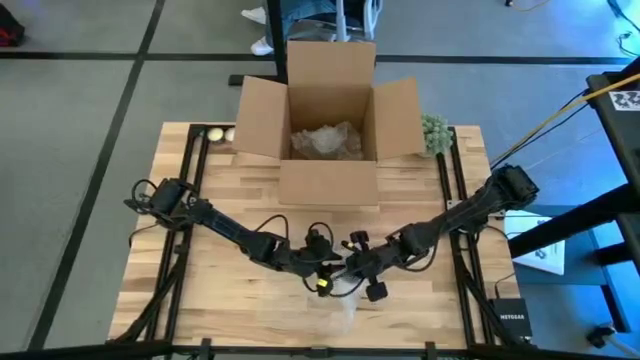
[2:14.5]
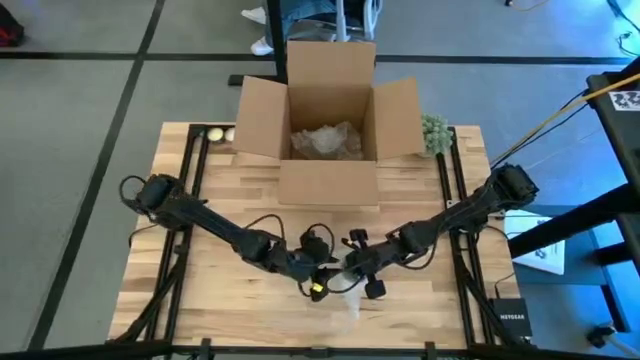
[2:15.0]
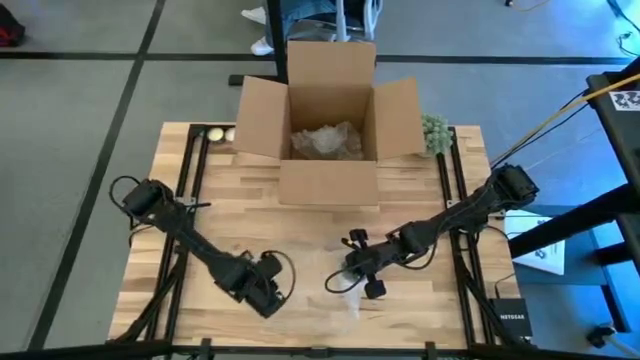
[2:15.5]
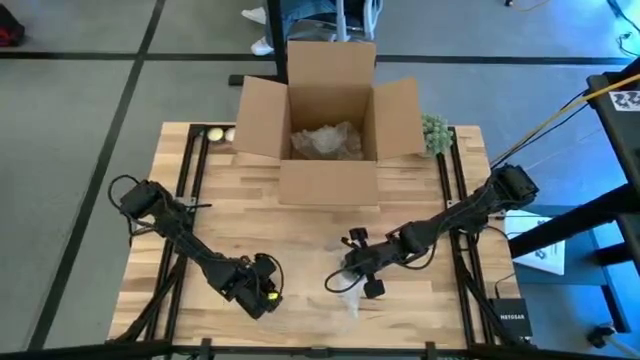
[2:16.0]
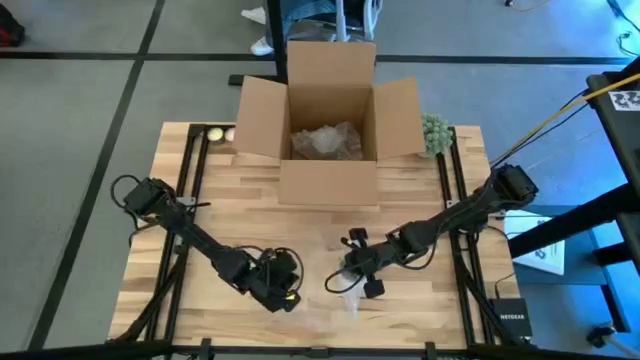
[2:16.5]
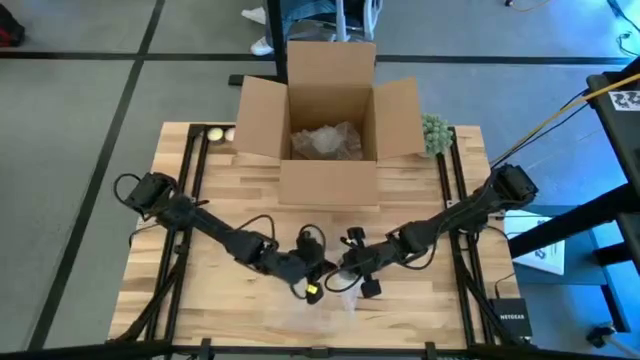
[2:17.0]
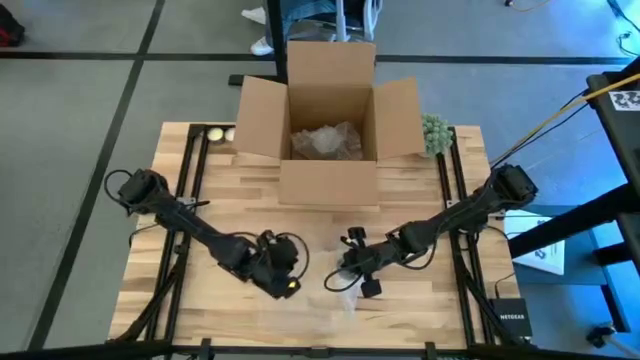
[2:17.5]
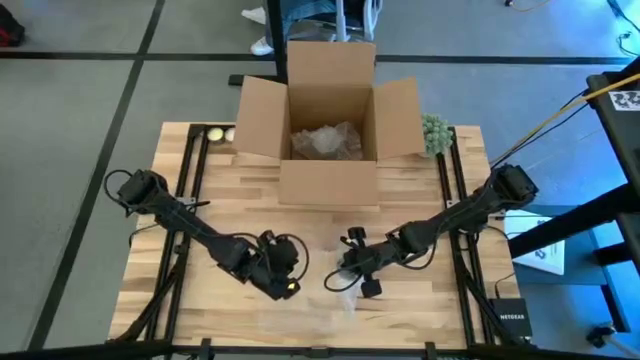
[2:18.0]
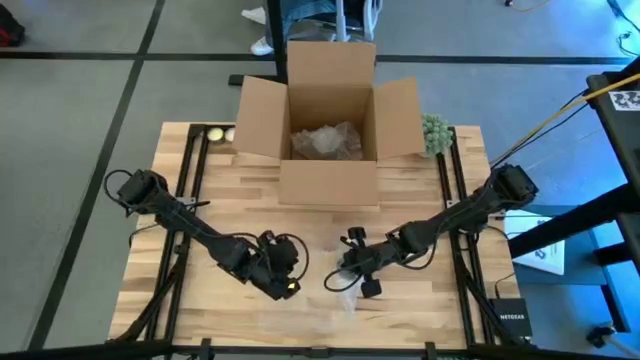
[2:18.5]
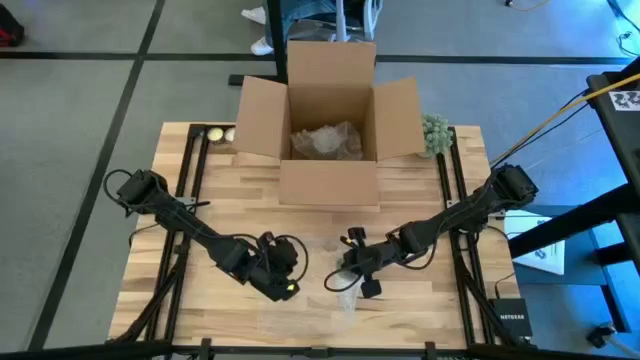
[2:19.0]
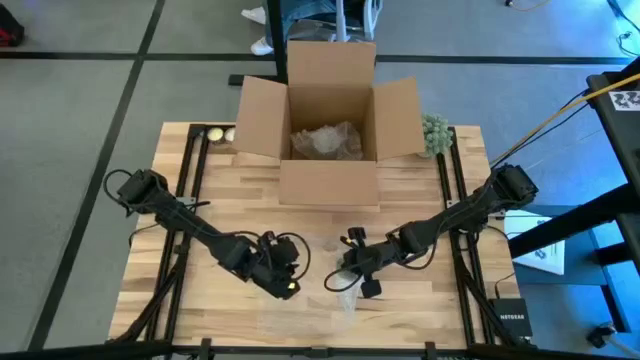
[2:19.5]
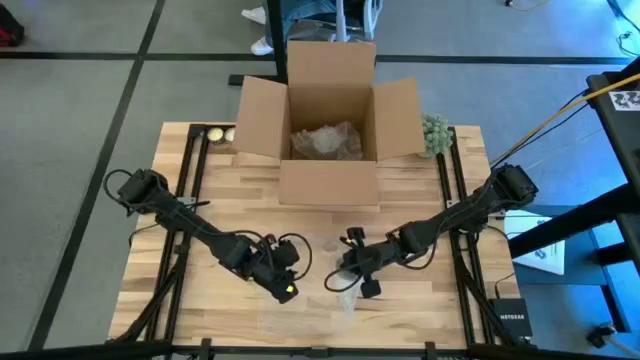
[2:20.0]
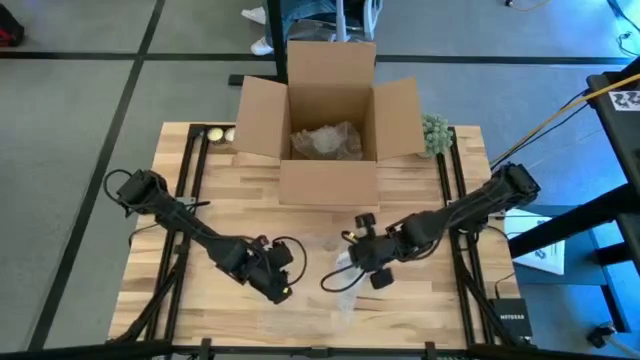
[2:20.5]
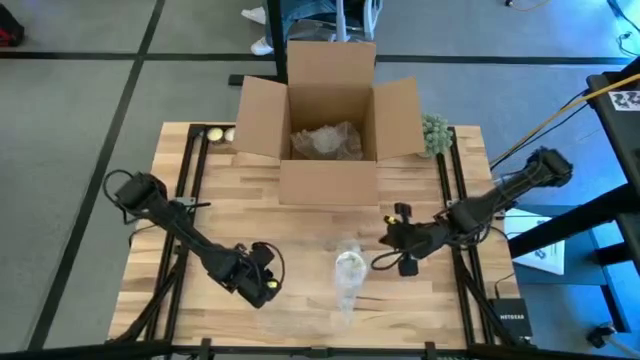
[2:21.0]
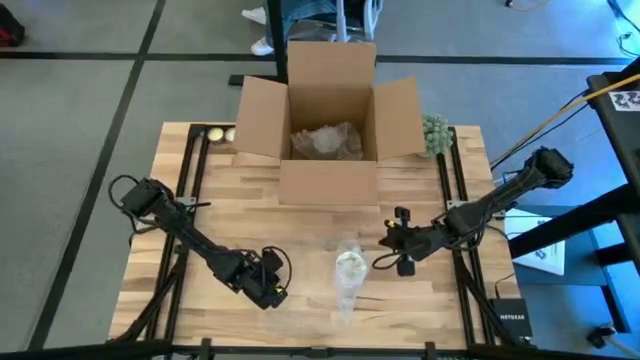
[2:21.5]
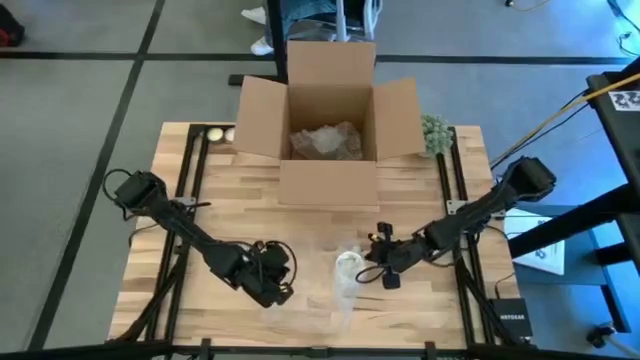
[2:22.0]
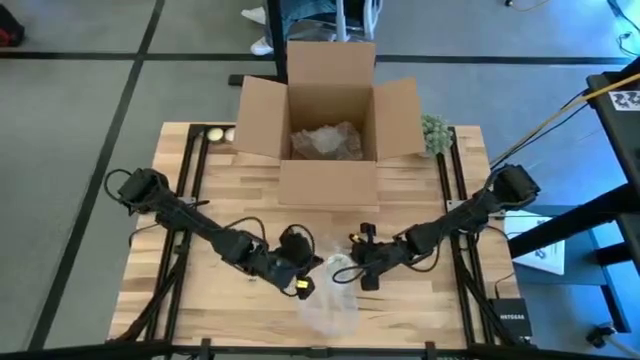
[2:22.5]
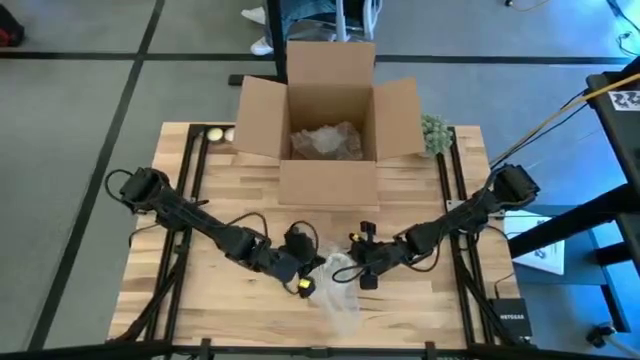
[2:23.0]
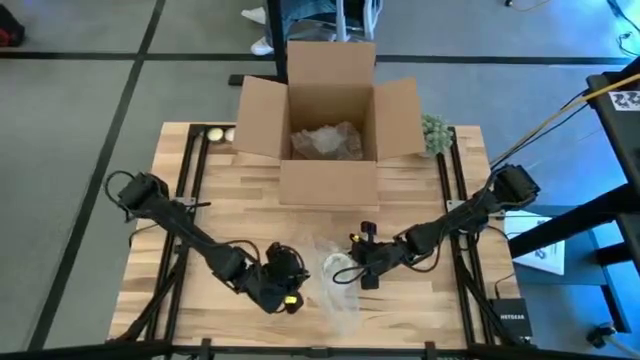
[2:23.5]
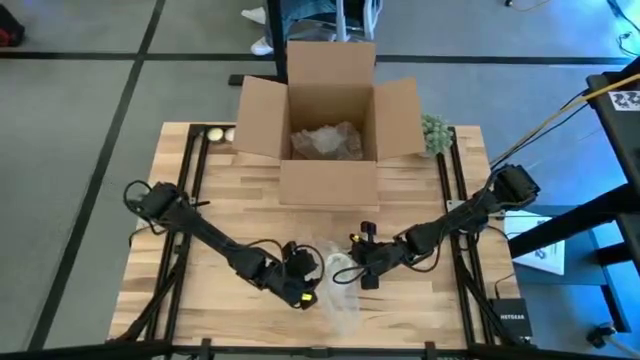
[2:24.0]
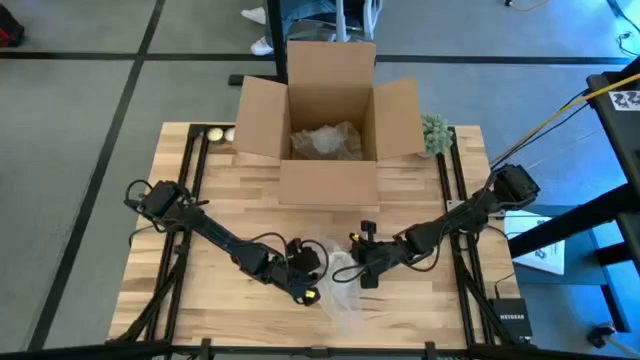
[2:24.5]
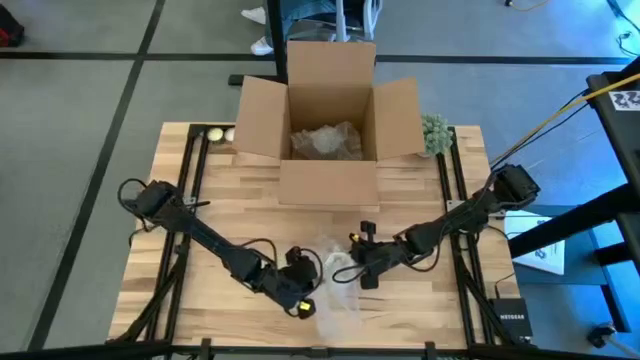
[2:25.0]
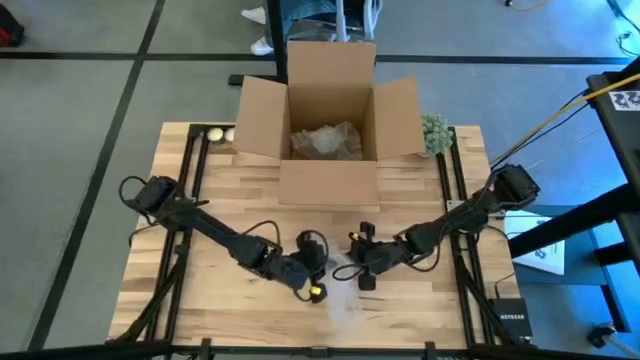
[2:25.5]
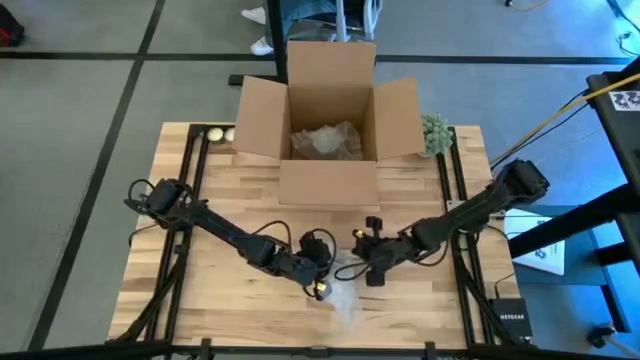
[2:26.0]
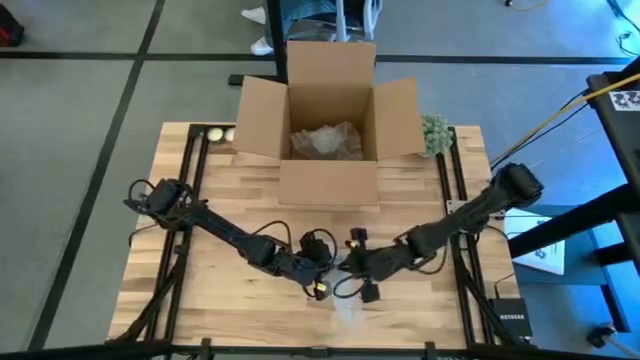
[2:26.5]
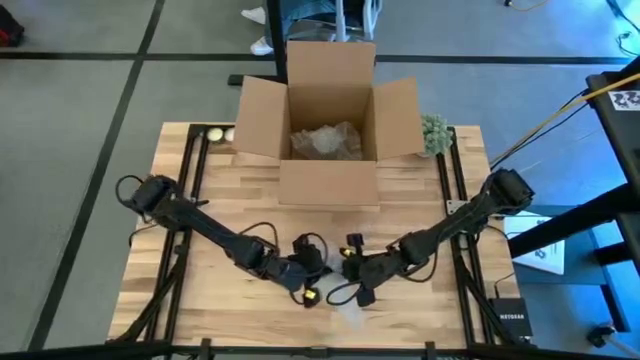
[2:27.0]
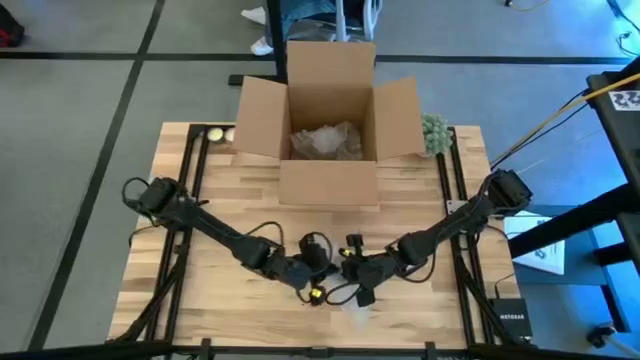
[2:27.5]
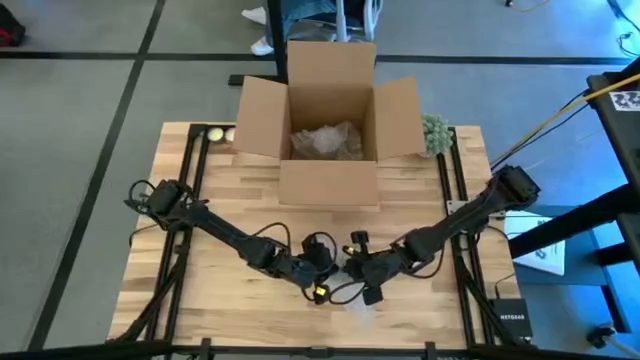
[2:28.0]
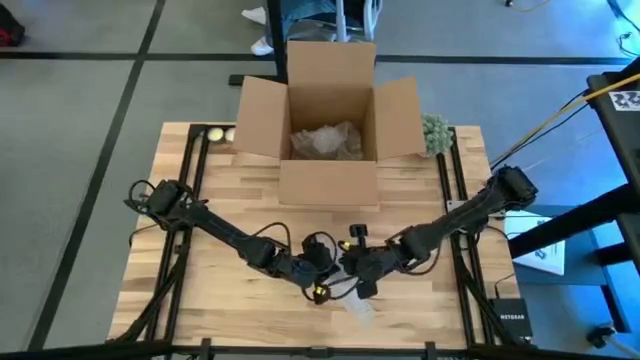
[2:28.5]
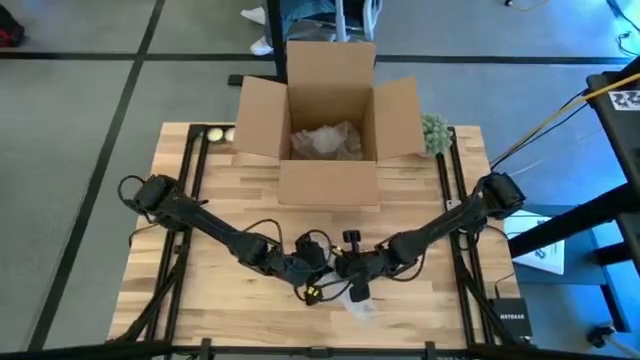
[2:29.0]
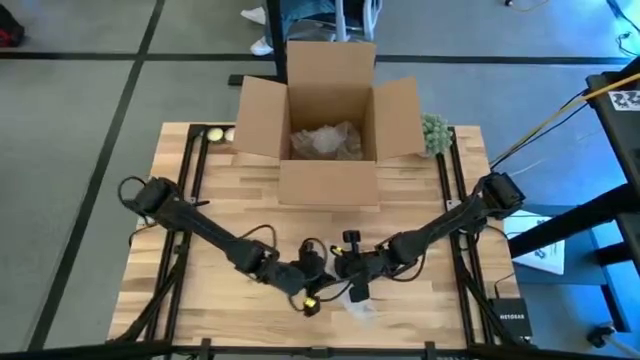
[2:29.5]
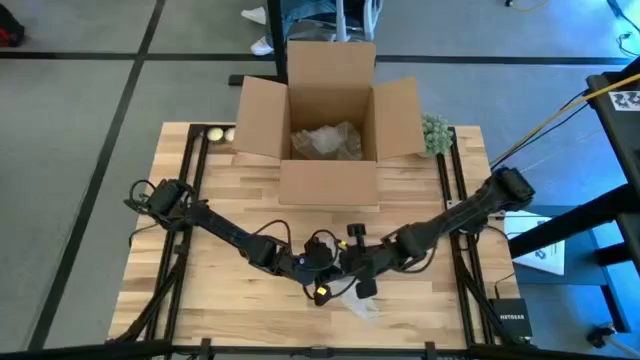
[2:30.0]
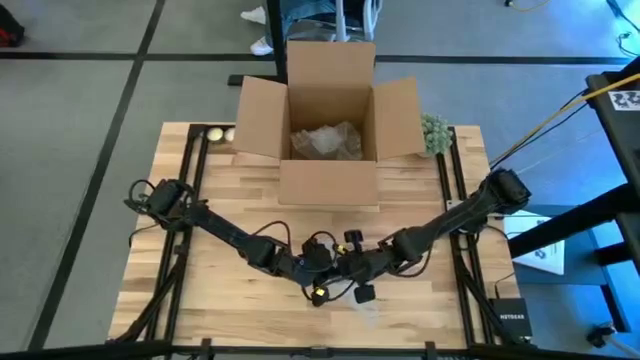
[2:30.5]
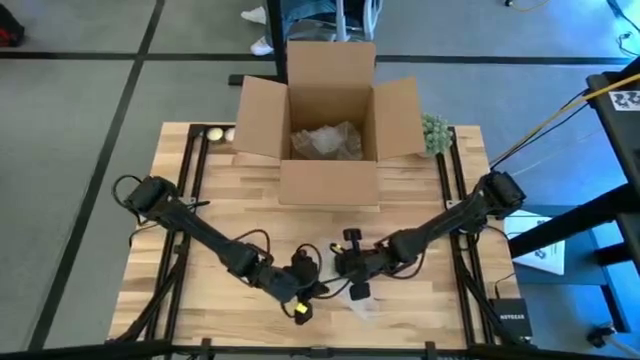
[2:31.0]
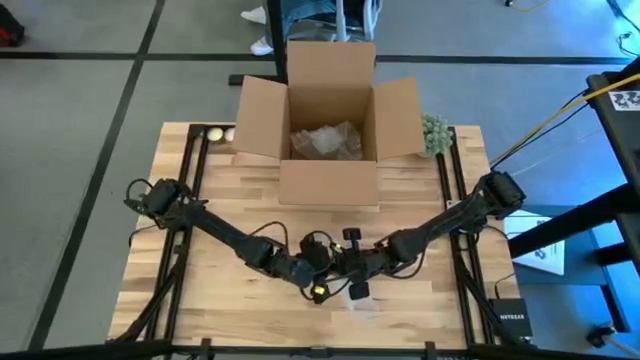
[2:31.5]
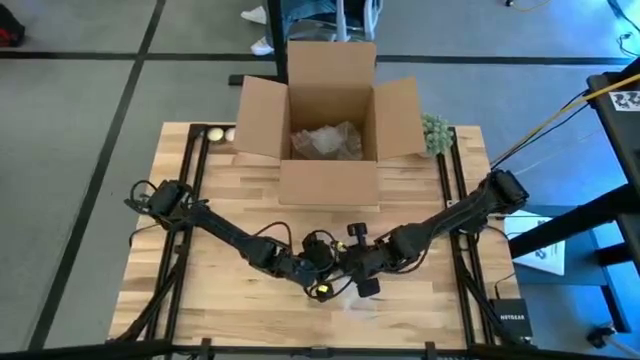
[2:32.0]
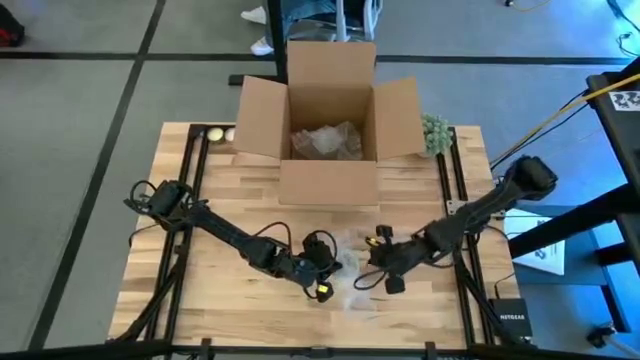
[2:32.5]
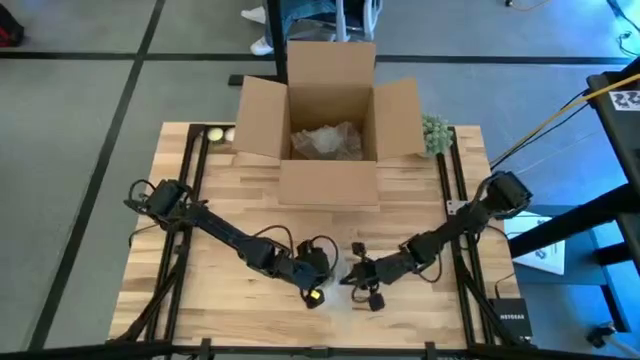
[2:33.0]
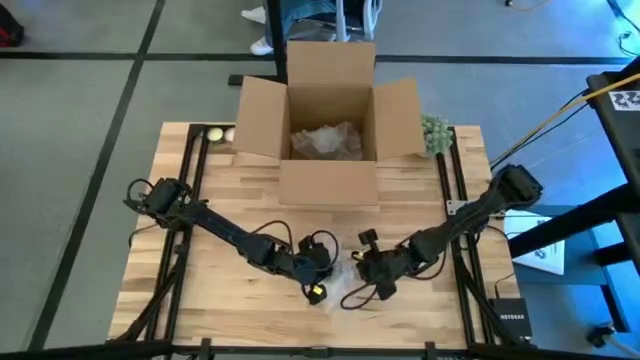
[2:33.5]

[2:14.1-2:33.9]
Task: wrap mug
Wrap the mug with the bubble wrap
